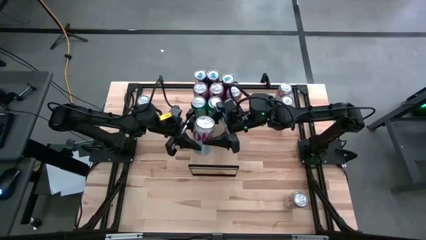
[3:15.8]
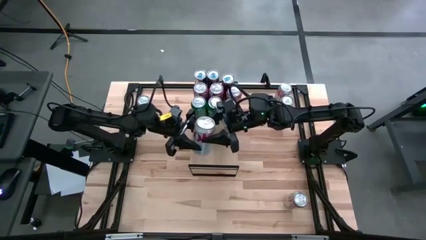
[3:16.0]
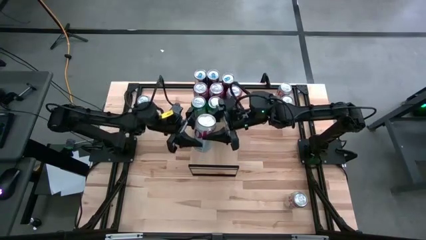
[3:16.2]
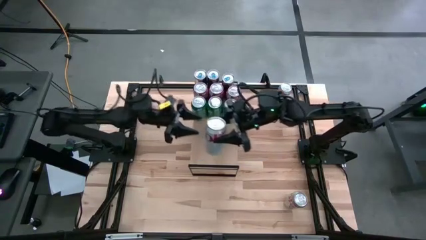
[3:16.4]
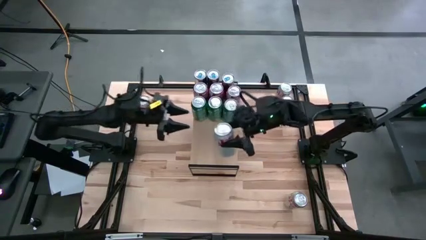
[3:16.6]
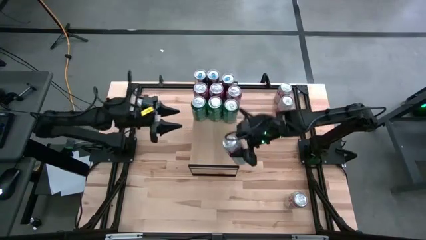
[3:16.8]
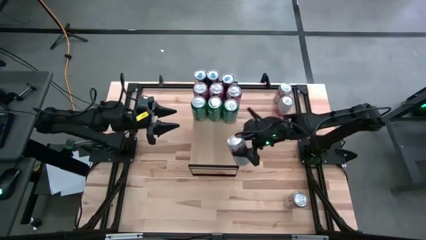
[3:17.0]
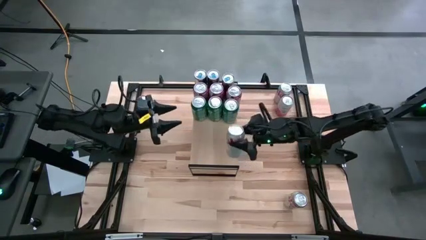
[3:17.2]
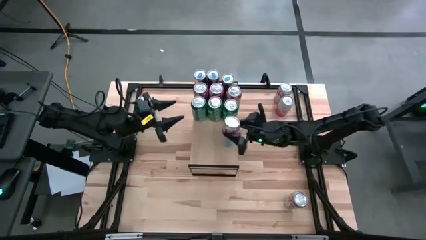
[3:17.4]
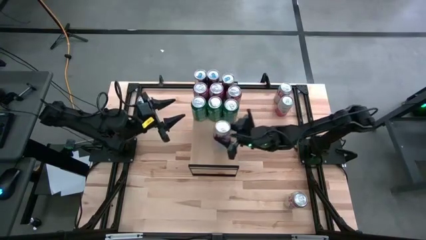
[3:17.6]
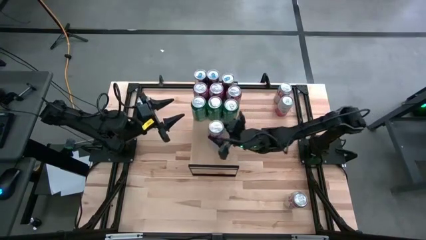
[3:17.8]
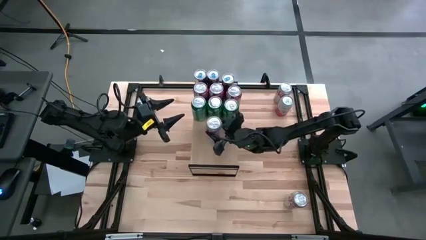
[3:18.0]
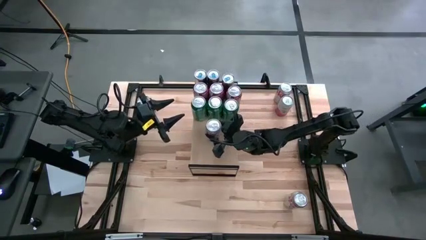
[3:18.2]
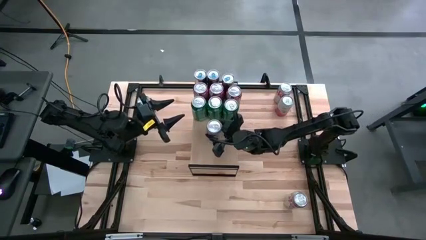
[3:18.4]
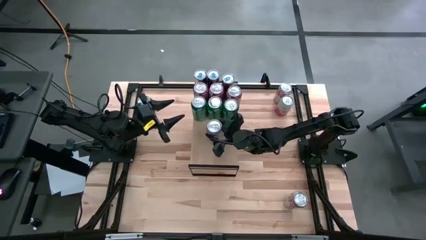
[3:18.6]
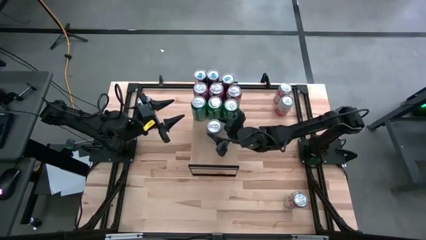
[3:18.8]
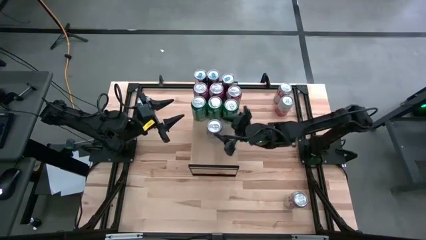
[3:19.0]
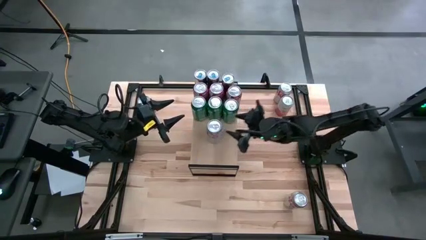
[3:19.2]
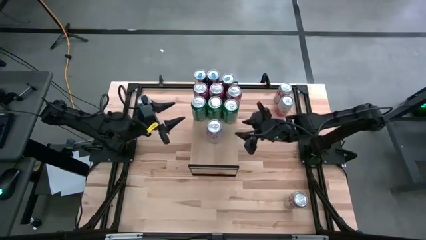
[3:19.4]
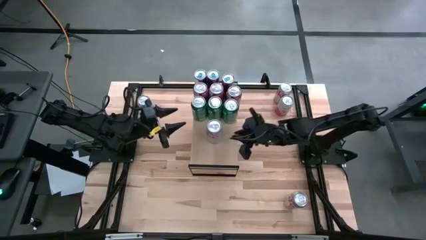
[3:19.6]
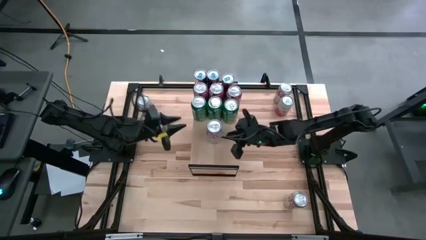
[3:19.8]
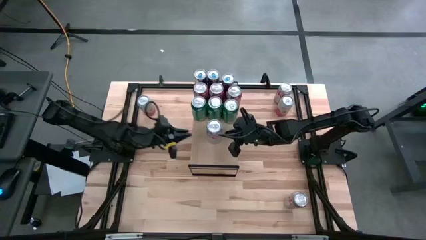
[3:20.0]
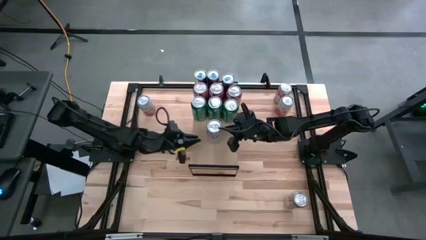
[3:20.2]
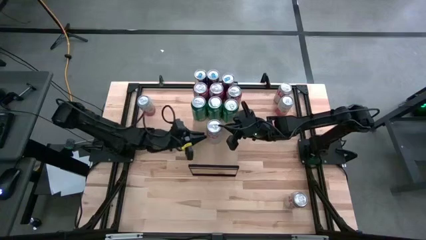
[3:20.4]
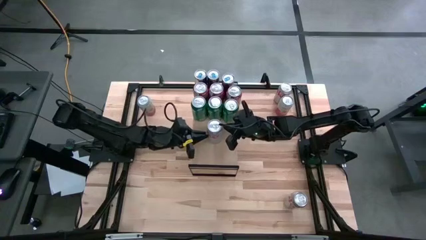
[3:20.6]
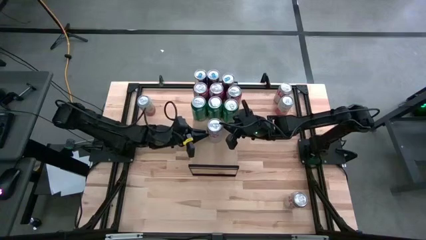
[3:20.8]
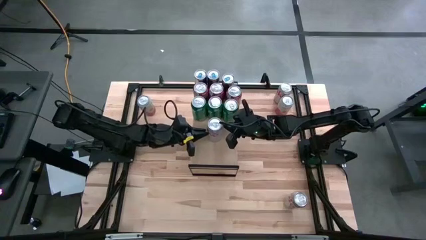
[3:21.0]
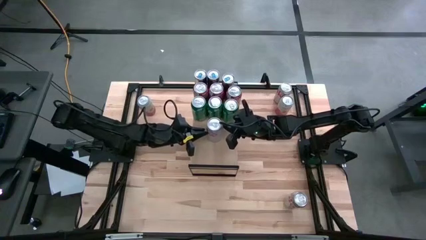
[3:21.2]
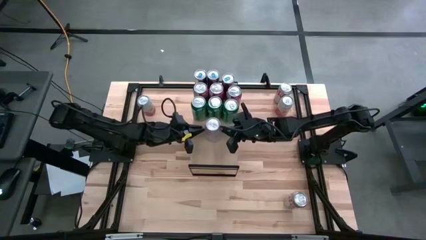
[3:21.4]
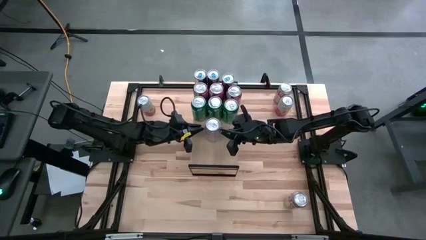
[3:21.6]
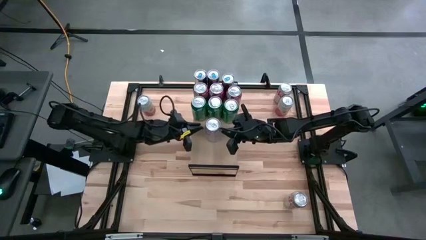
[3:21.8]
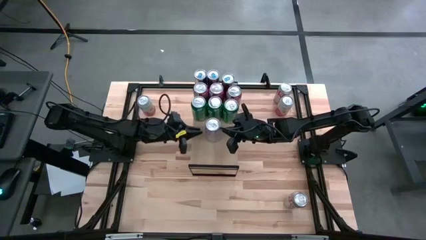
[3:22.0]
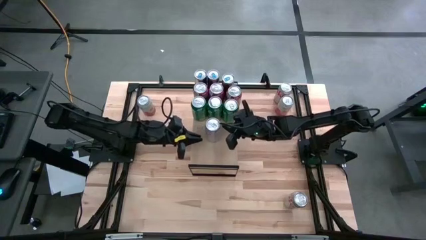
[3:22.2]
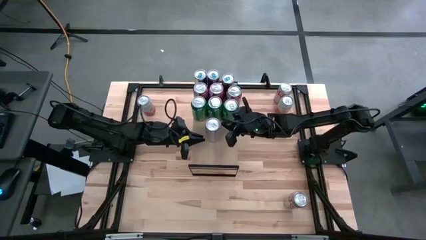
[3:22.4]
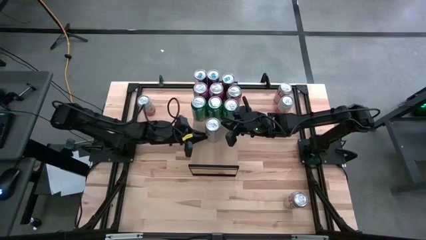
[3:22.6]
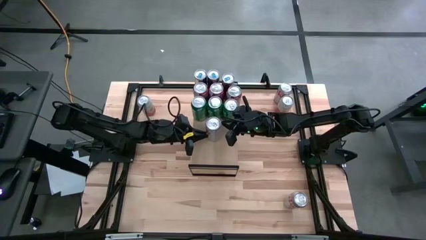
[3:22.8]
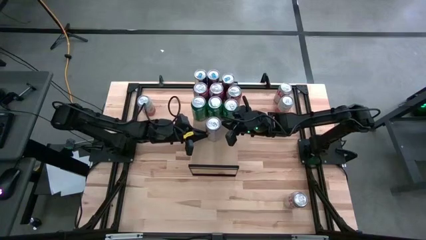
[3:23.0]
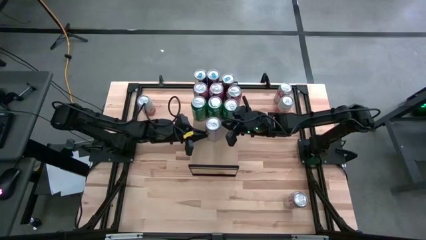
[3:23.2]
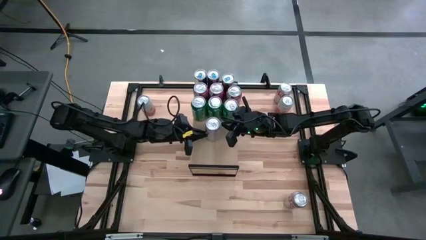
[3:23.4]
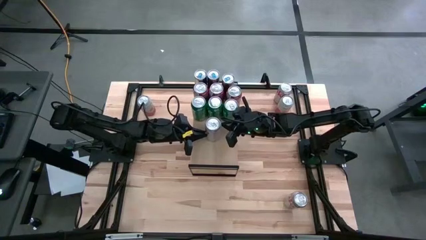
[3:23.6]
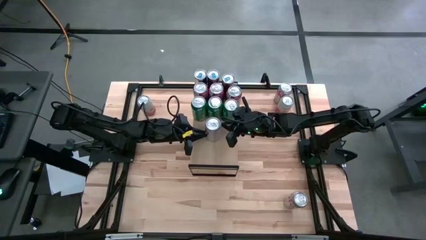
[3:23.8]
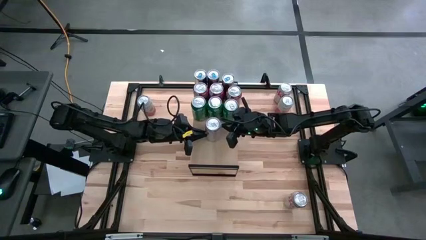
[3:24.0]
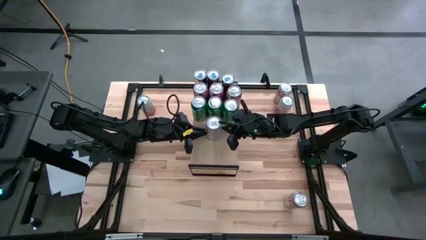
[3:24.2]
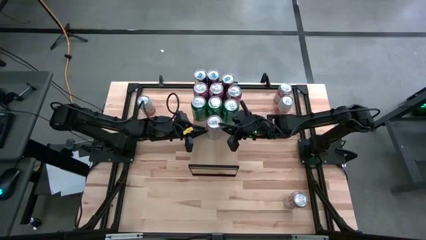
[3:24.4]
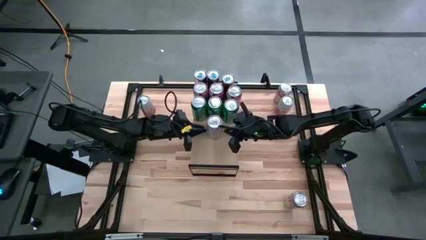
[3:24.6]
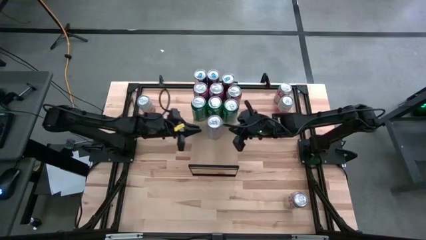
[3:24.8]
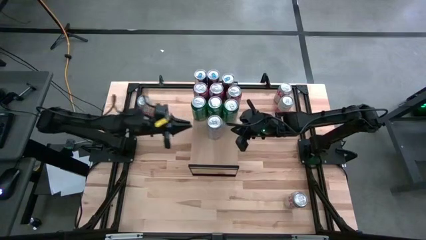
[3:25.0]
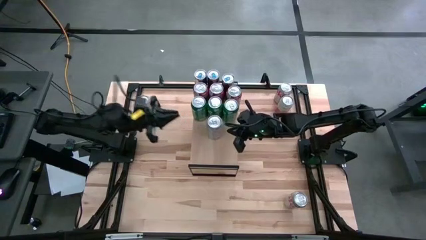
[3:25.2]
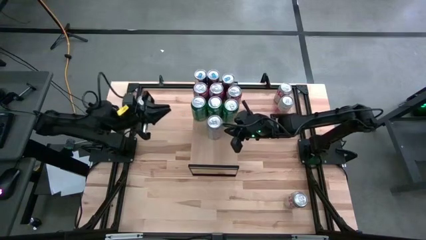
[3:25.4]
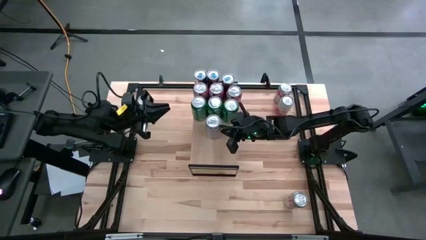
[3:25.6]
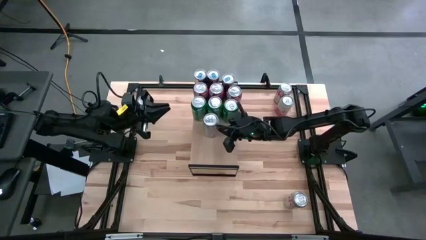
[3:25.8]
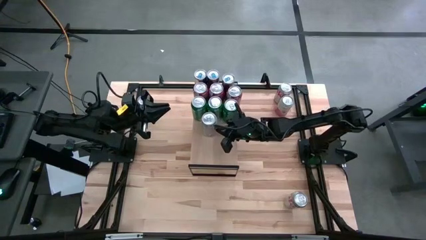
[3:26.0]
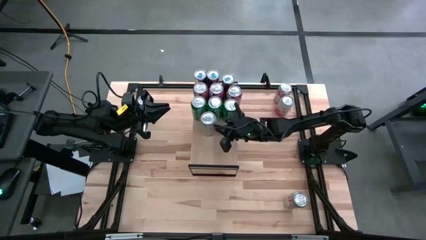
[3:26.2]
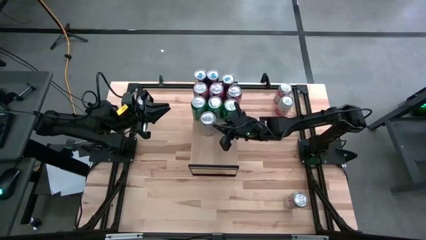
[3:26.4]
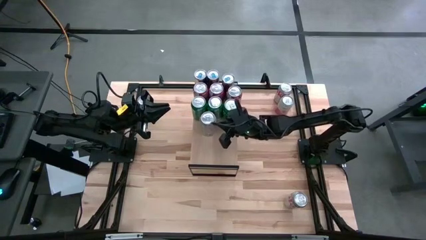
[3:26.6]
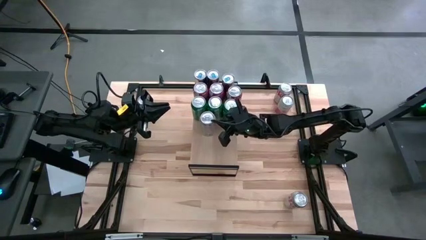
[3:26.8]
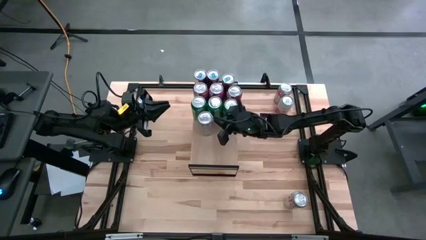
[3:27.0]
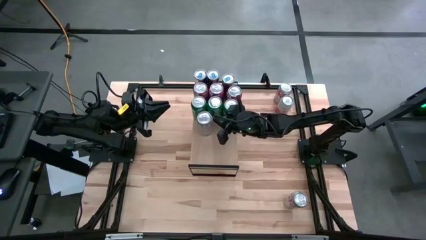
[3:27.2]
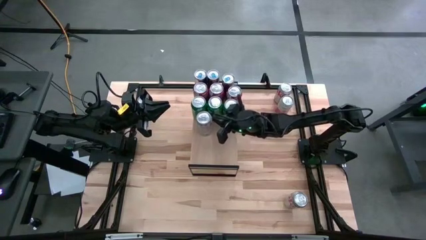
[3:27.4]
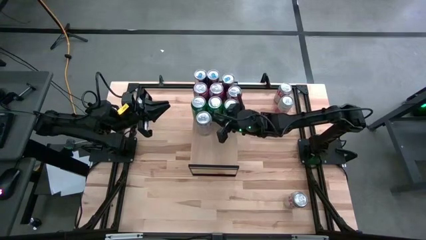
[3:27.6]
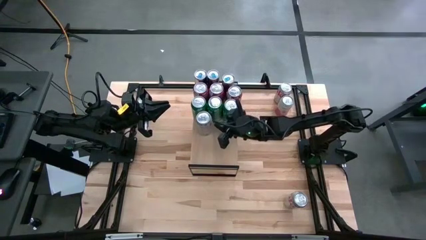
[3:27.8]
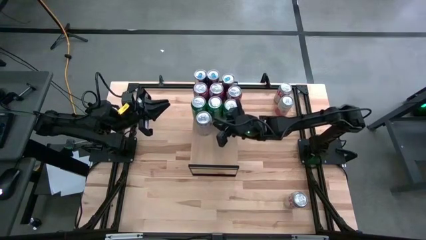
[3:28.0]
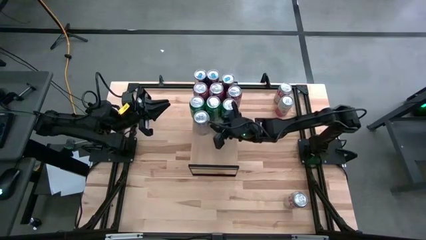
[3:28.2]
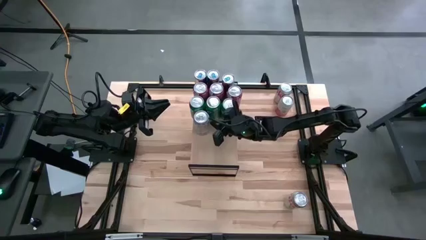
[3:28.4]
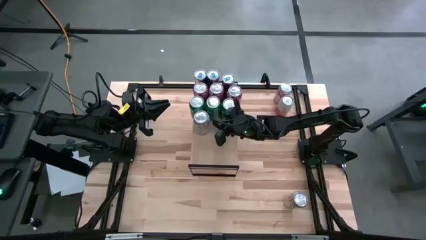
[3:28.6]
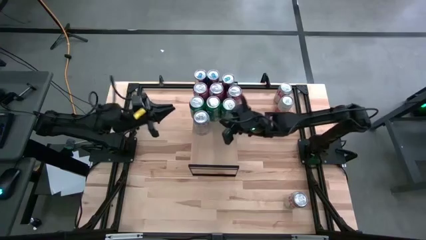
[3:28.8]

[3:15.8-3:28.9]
Task: Place canned beverage on shelf
Put the middle red silver soda can on the shelf

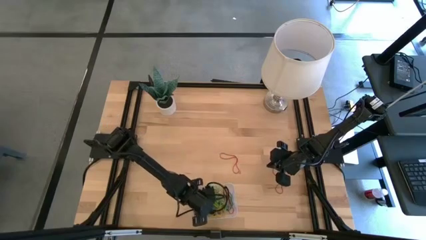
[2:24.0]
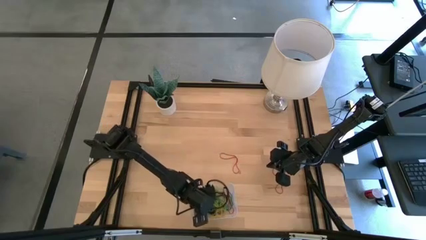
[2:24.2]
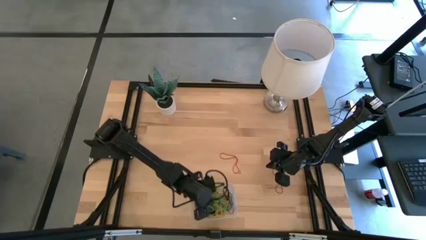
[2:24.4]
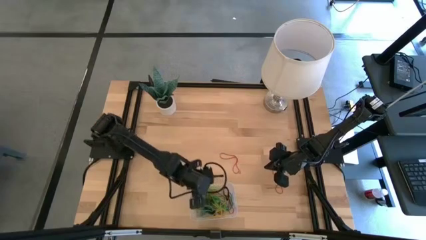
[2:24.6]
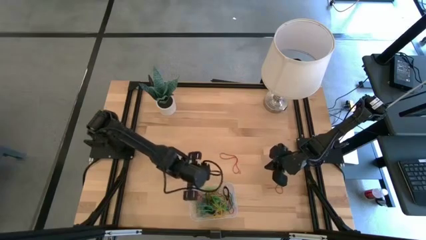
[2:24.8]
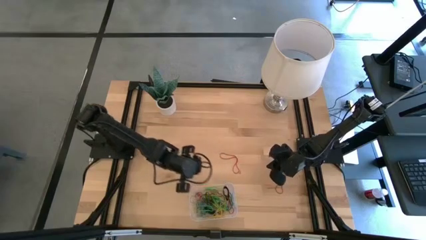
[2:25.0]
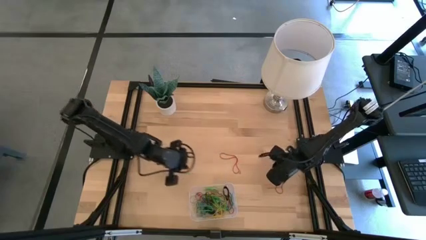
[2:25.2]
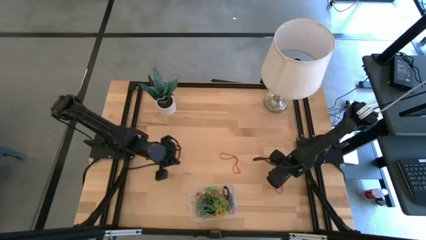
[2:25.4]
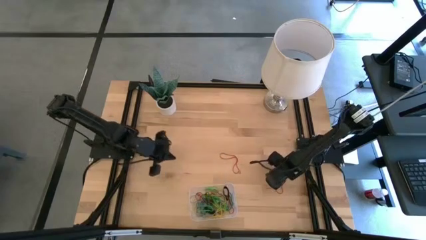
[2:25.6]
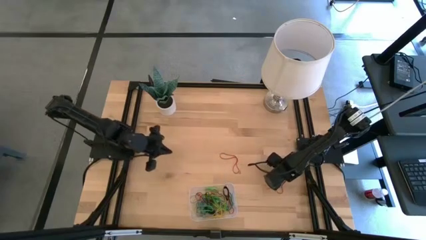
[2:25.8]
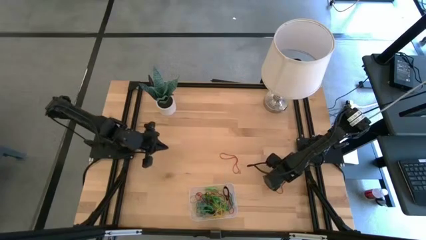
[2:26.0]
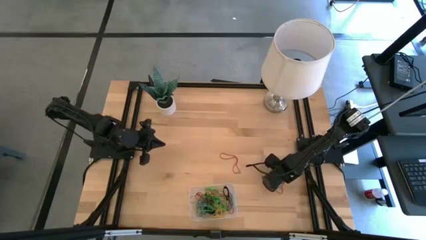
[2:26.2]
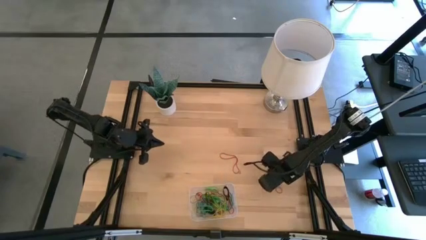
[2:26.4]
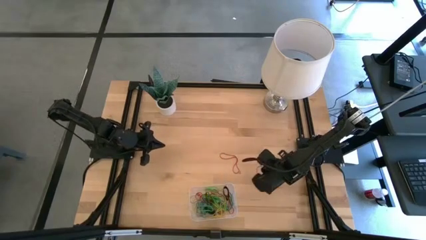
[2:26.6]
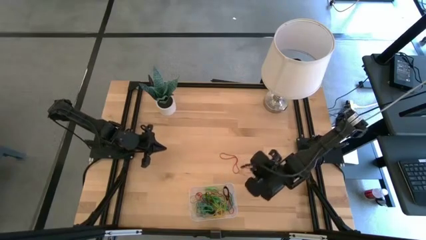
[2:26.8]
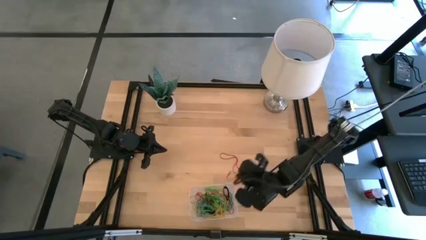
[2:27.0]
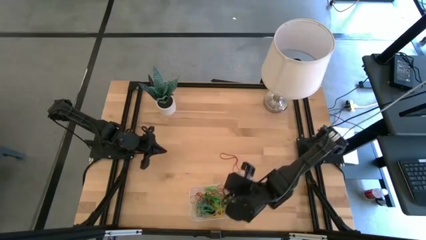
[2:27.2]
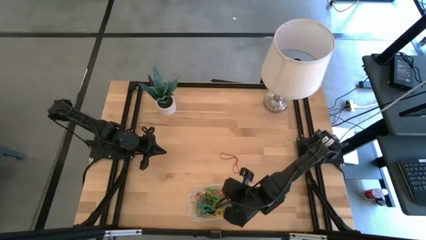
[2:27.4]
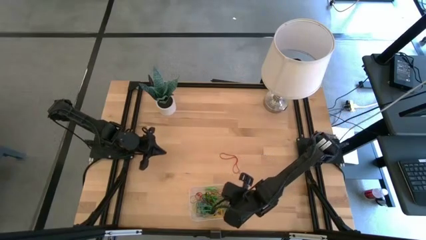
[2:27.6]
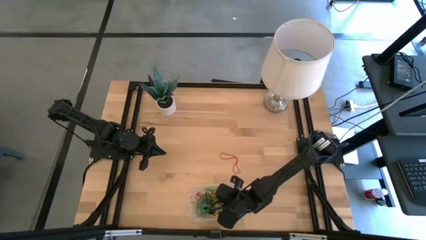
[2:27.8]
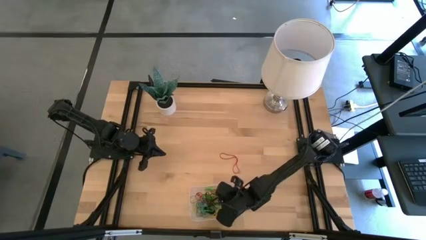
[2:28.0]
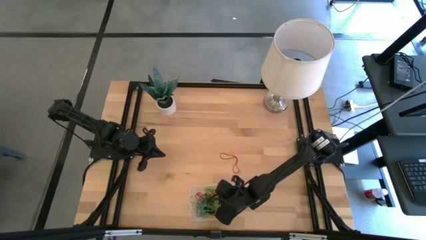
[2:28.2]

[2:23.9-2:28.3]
Task: Pick and place rubber bands into bin
Put the red rubber band into the transparent bin
